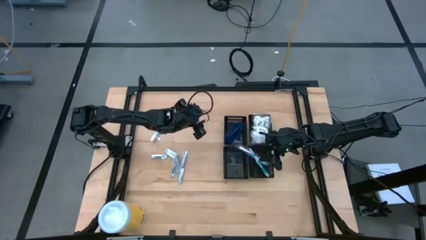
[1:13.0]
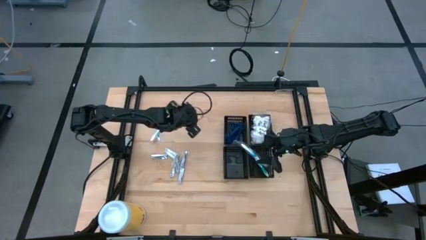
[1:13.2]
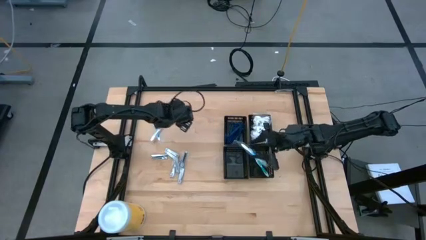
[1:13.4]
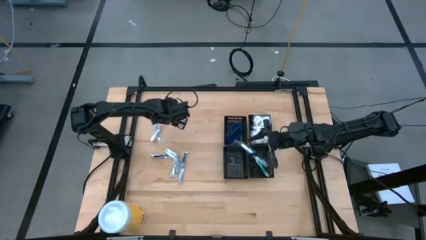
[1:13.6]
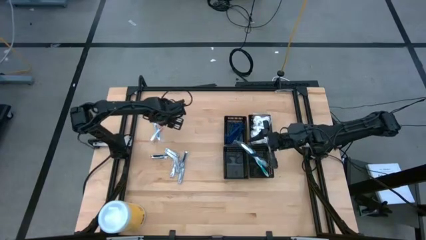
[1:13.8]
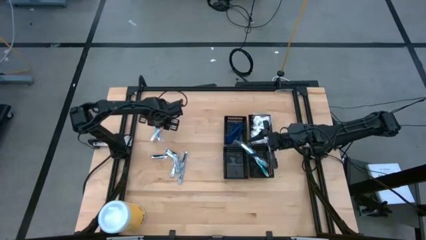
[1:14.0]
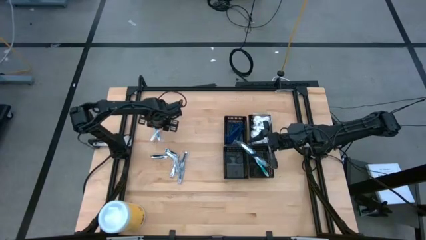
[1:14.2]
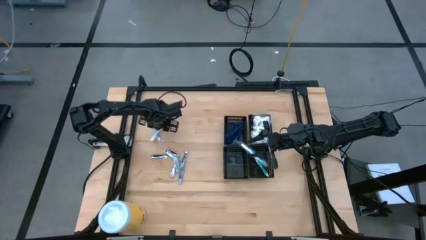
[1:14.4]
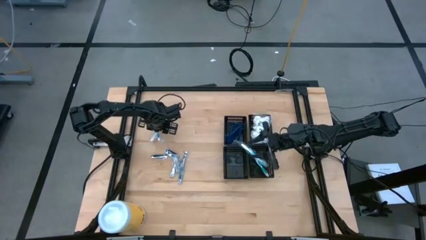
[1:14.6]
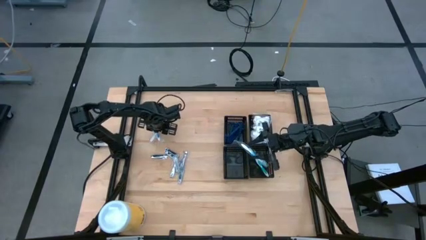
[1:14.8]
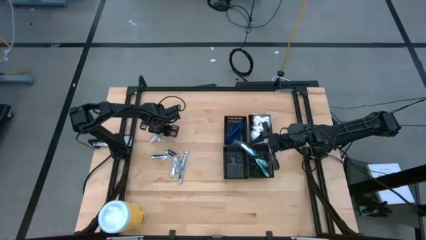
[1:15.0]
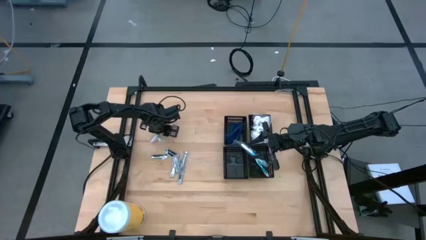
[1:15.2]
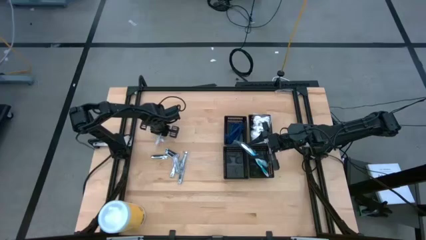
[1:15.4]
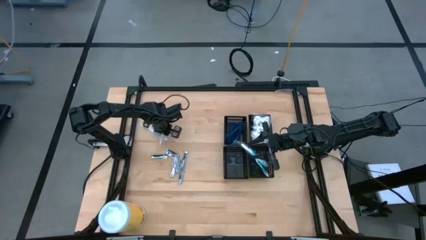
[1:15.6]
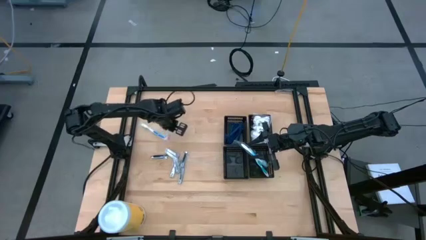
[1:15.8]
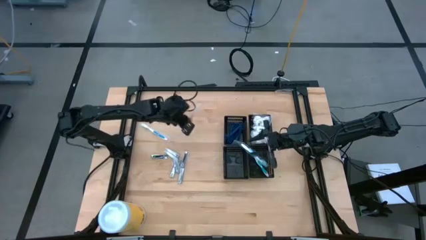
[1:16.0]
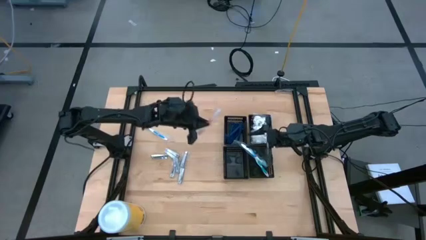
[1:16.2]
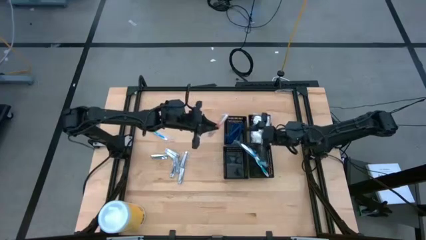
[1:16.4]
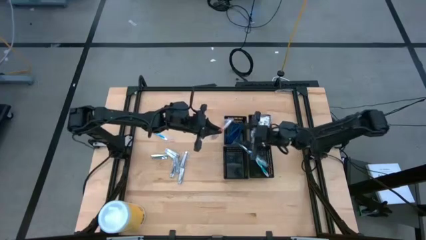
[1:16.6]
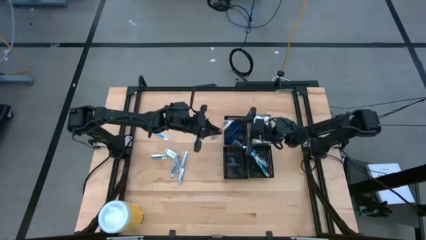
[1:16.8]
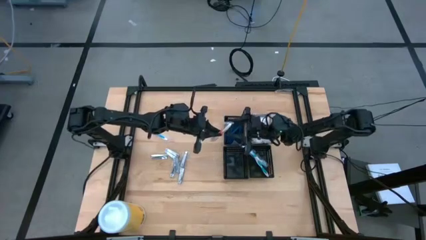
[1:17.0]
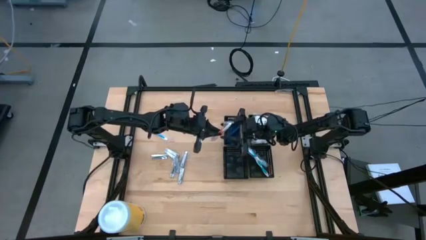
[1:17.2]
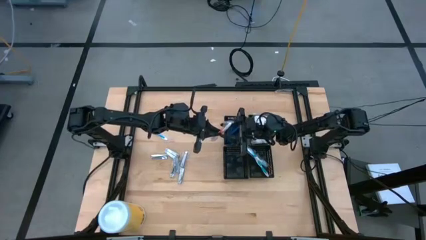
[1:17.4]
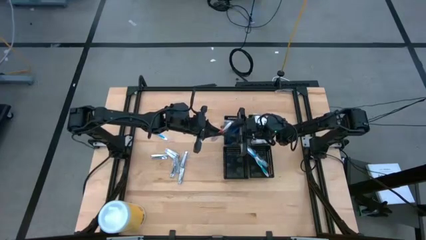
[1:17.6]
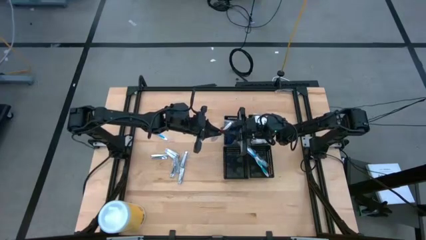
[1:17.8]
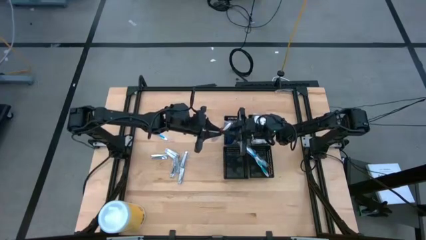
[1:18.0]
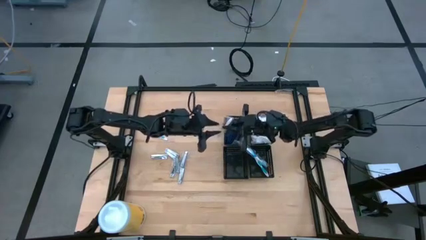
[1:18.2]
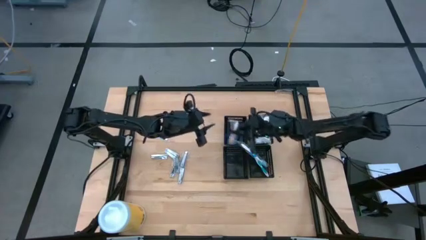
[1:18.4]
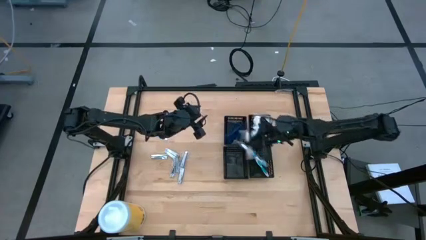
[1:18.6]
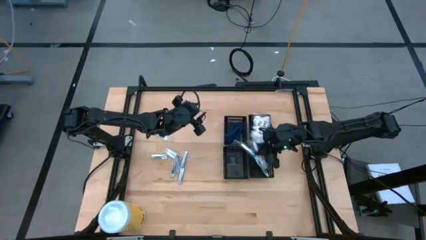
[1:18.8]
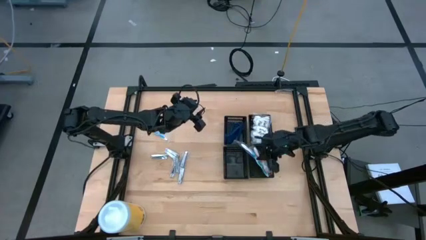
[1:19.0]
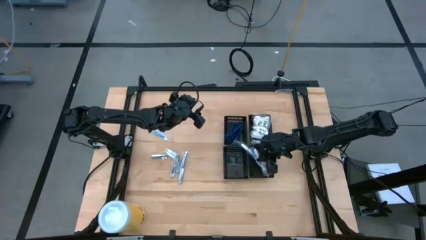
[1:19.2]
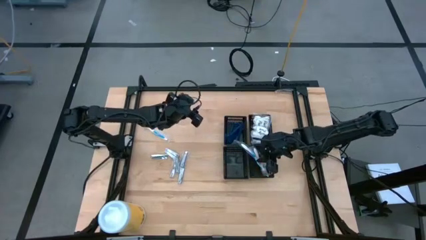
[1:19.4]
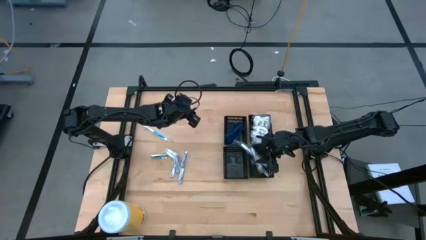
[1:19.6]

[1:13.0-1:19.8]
Task: Pick & Place Travel size toiletries
Put the orange toothbrush into the bottom right black basket

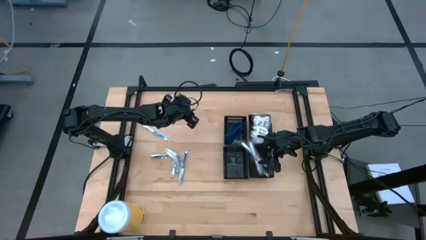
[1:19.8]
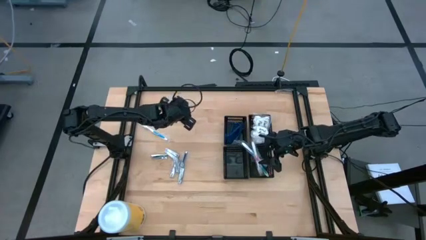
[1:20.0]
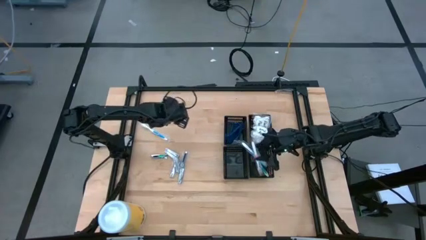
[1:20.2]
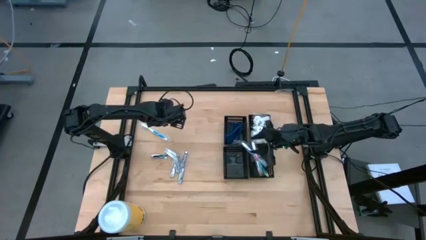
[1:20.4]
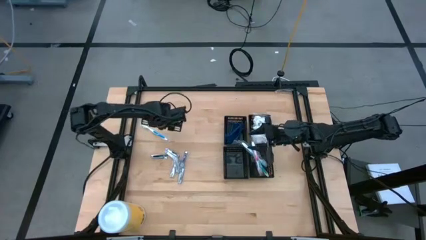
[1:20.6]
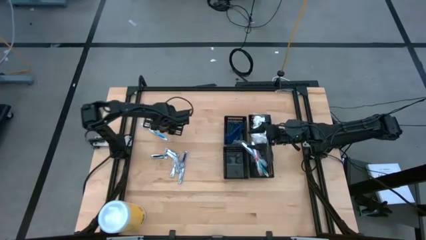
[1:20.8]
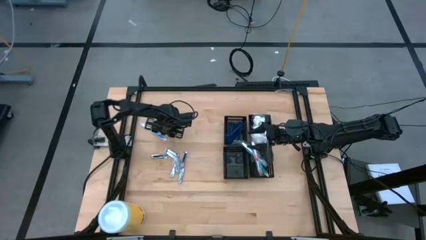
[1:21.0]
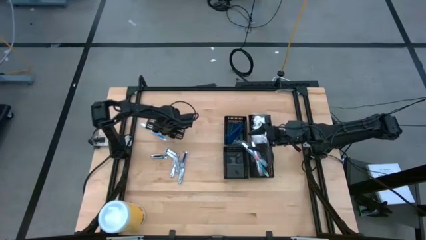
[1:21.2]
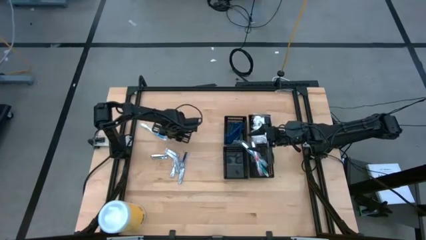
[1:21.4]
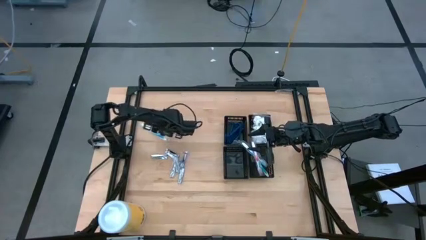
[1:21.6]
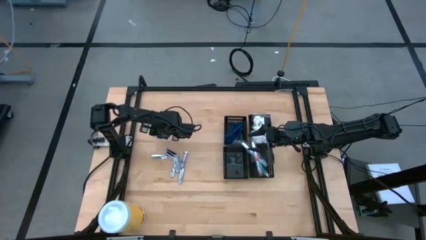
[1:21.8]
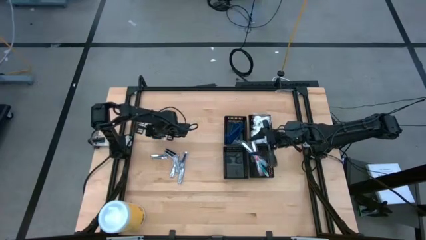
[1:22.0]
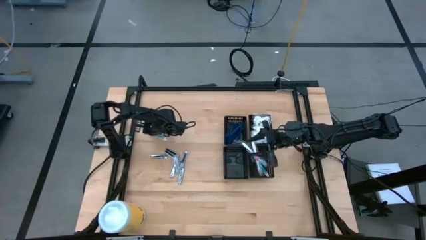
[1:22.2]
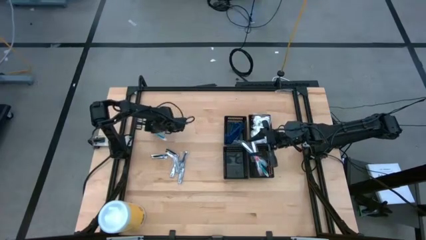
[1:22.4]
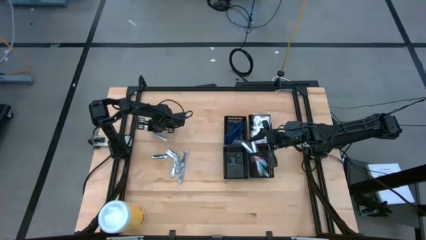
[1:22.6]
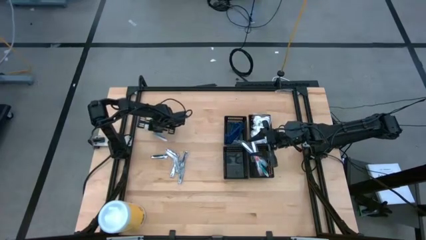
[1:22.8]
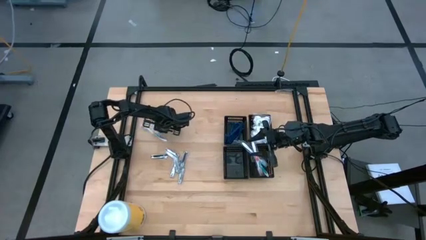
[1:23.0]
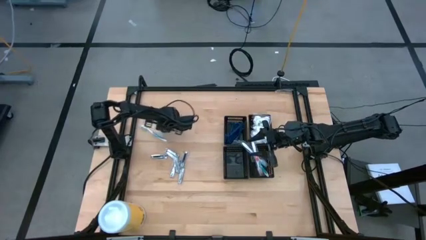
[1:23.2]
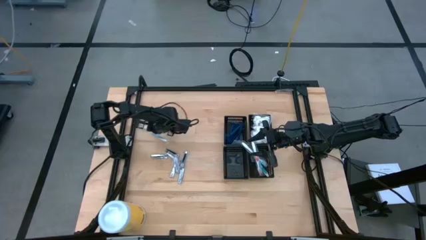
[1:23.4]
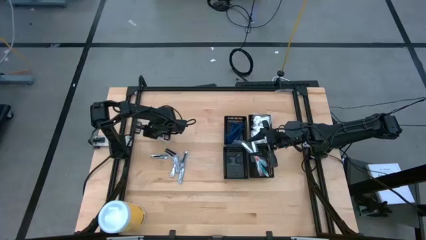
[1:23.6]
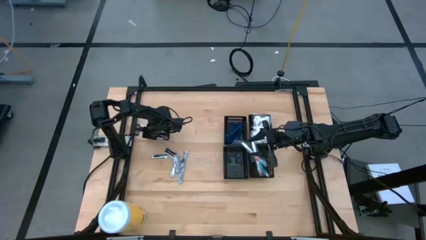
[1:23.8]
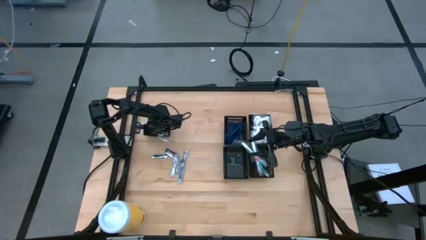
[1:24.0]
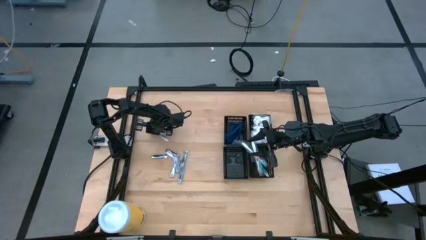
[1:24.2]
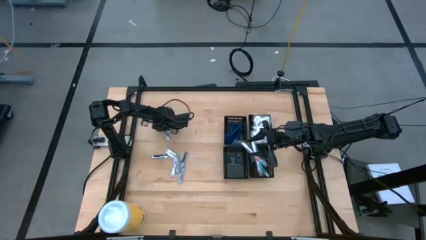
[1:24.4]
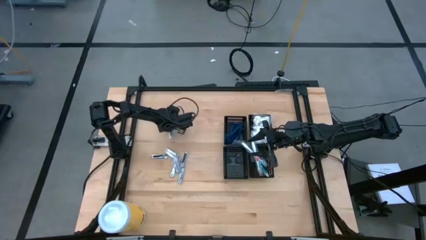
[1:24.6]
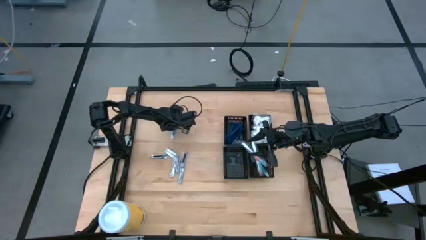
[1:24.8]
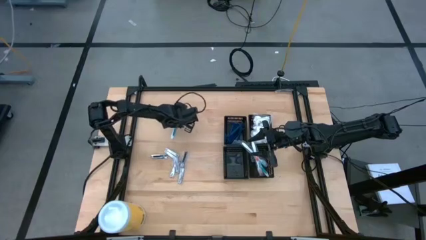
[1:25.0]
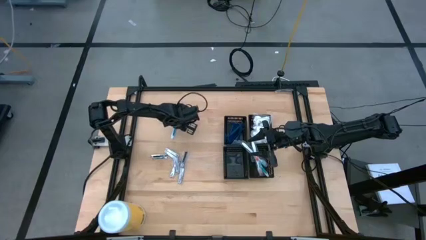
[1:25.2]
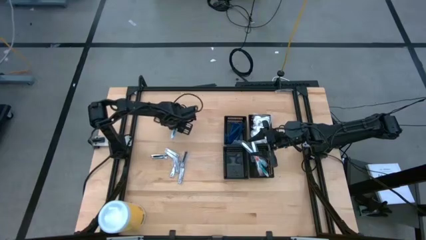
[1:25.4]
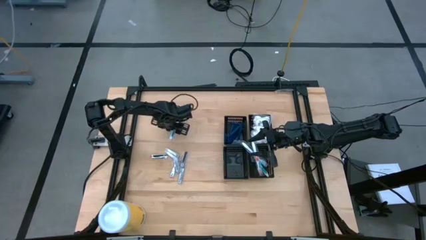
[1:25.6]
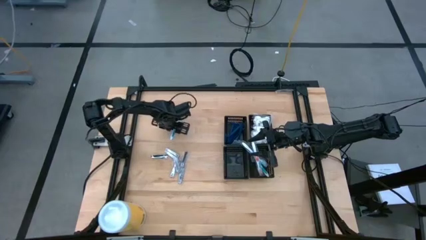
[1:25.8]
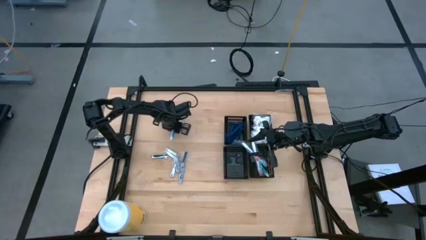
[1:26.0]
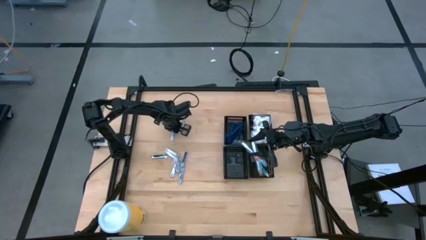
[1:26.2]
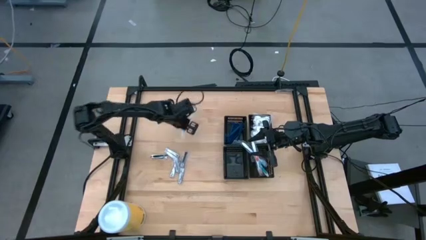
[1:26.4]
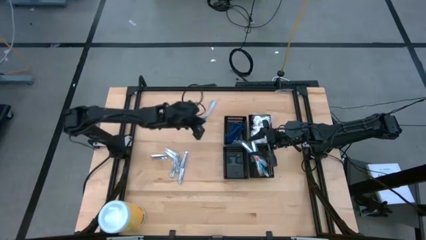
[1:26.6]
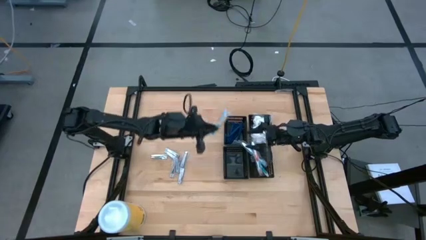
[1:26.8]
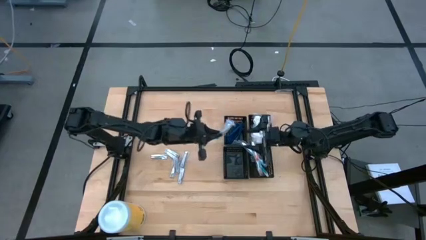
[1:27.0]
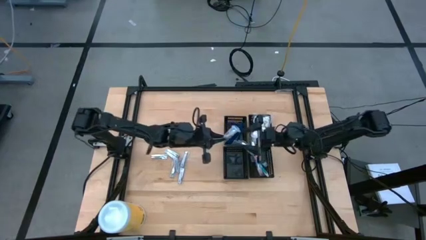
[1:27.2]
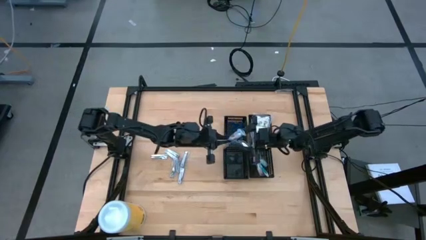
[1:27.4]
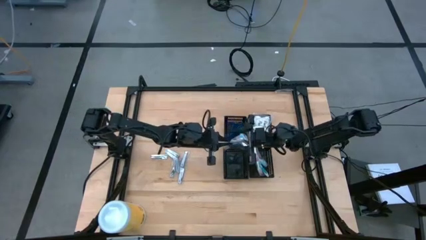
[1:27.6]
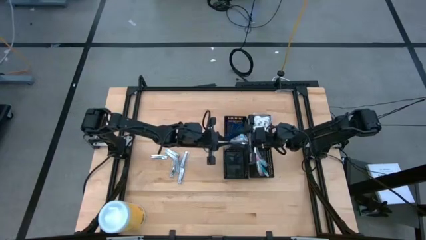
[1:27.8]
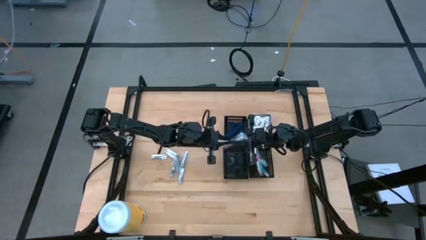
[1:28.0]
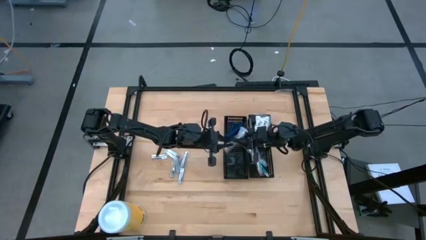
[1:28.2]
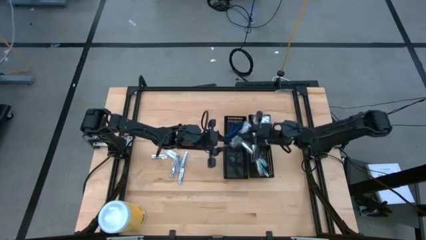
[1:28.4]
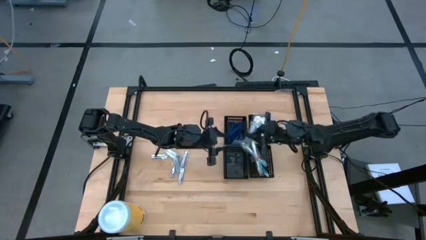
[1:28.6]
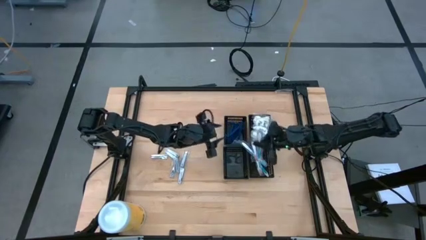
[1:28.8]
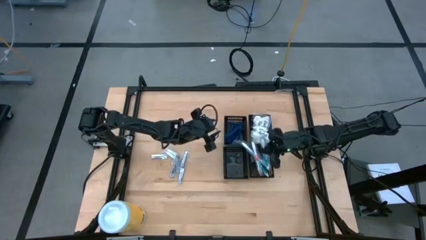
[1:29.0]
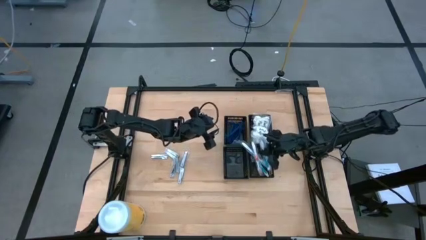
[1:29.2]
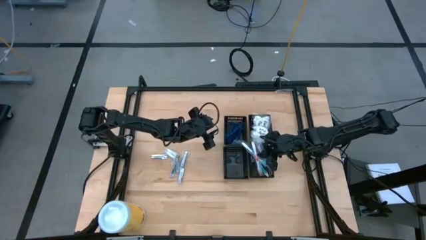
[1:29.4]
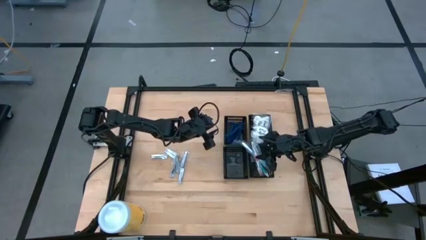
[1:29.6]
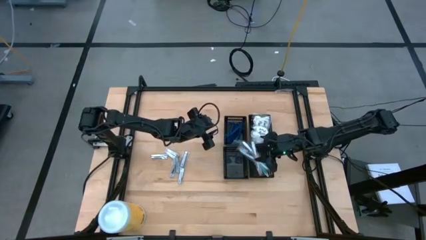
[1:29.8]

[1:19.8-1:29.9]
Put the blue toothbrush into the bottom right black basket

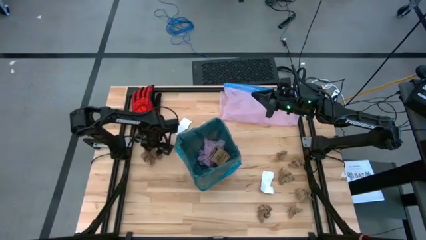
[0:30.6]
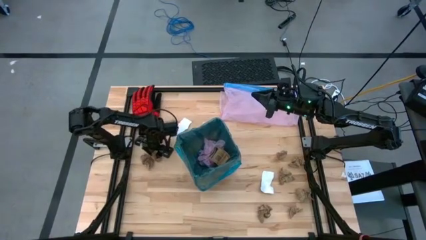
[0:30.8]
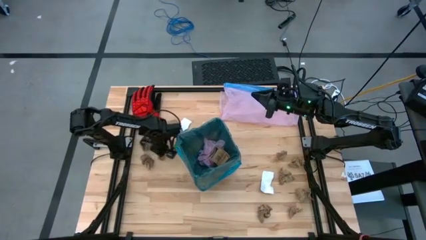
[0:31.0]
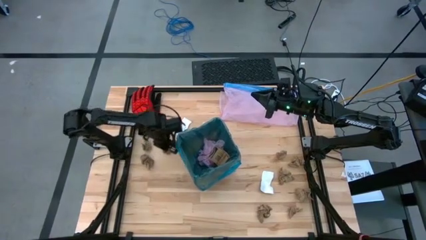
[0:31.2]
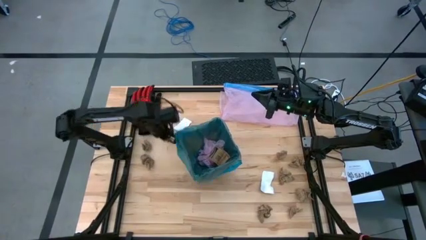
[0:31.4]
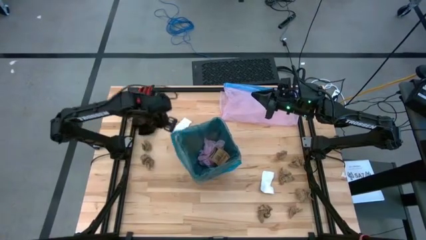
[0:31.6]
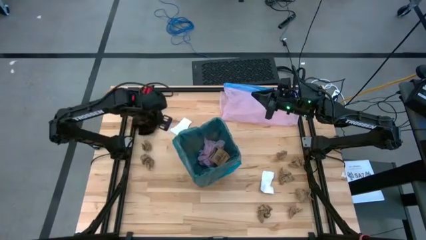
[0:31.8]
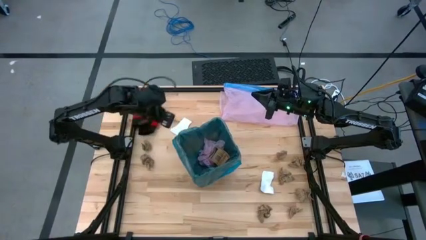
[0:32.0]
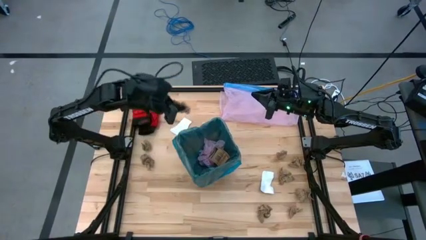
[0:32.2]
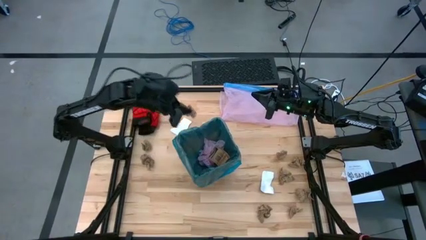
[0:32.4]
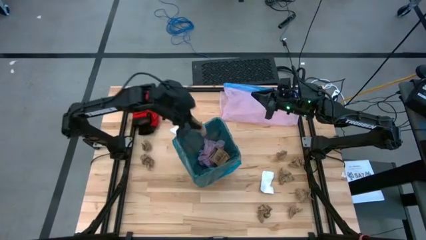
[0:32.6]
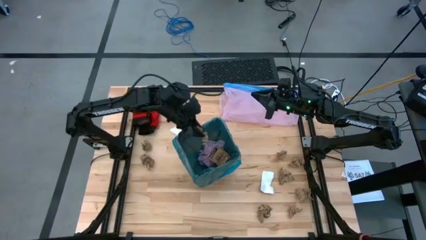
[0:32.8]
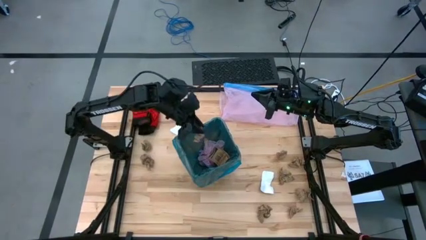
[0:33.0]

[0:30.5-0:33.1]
Task: place trash/remove bag and relplace
Put the brown napkin into the black trash bin
